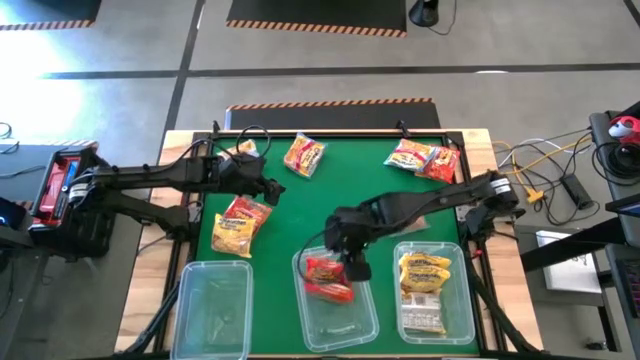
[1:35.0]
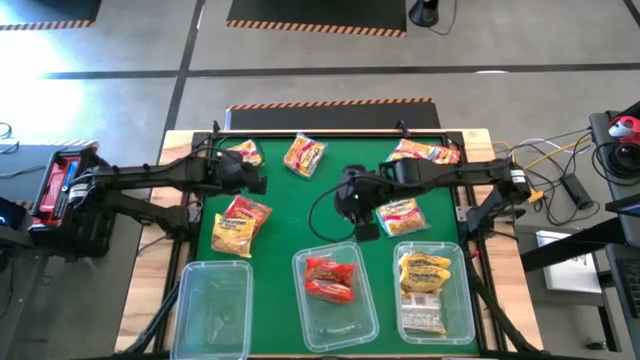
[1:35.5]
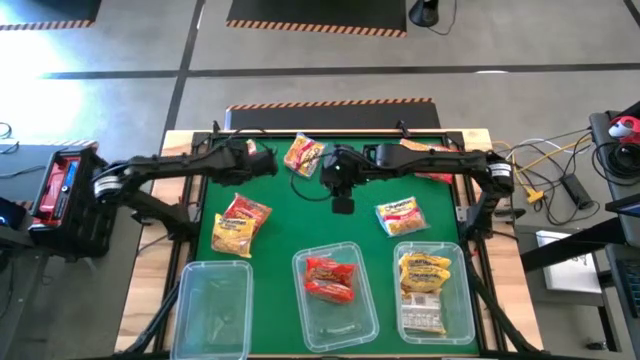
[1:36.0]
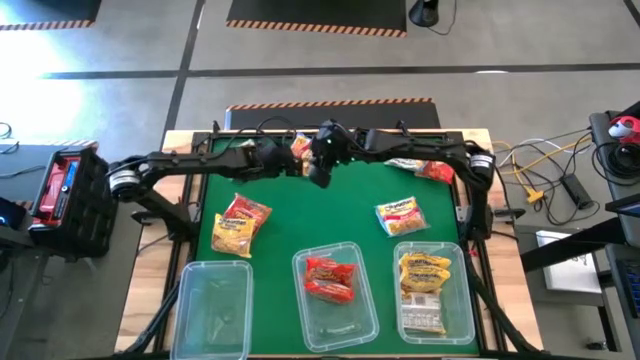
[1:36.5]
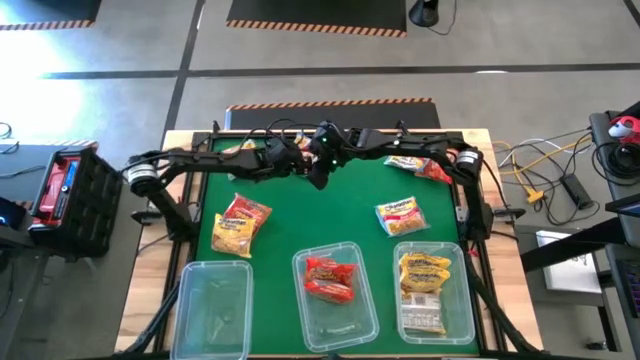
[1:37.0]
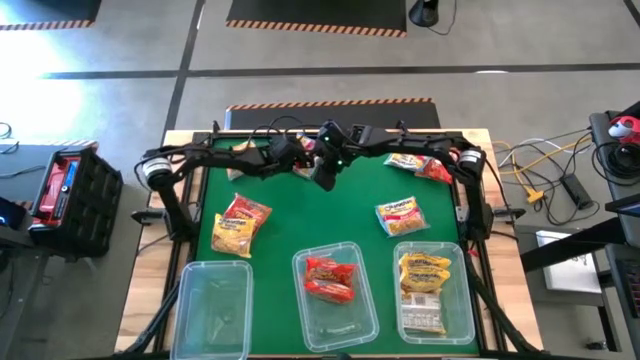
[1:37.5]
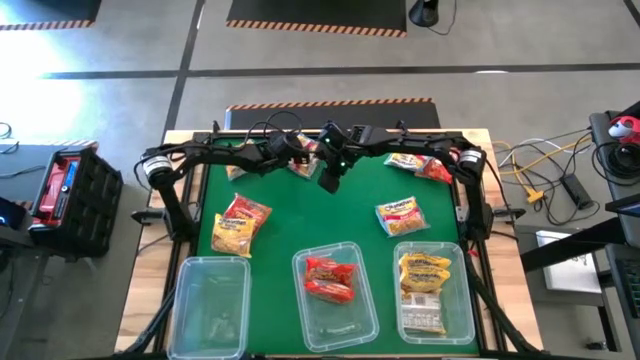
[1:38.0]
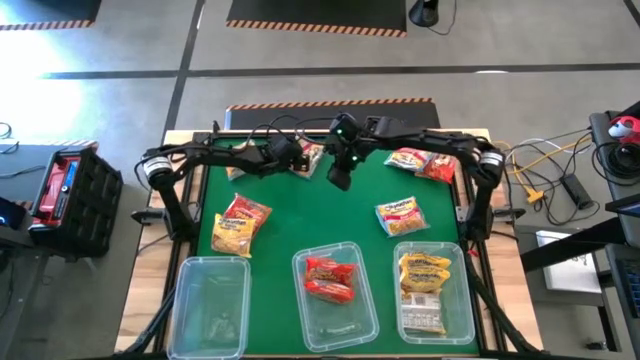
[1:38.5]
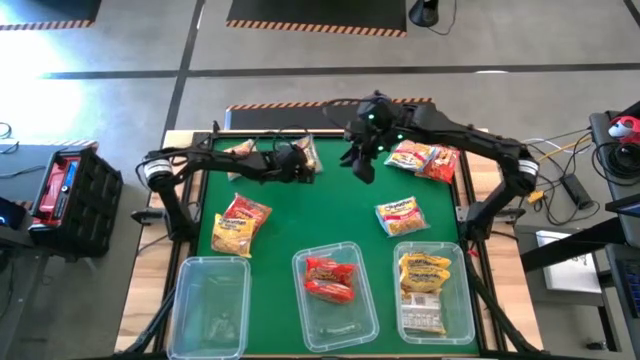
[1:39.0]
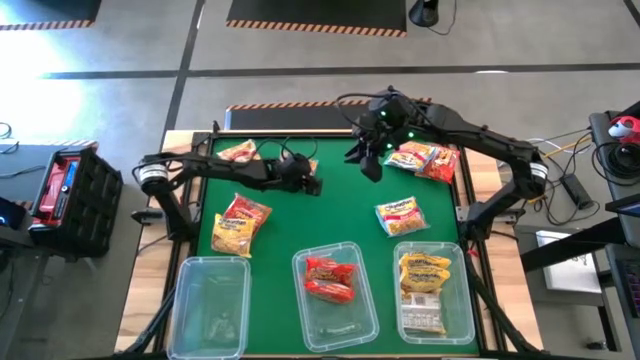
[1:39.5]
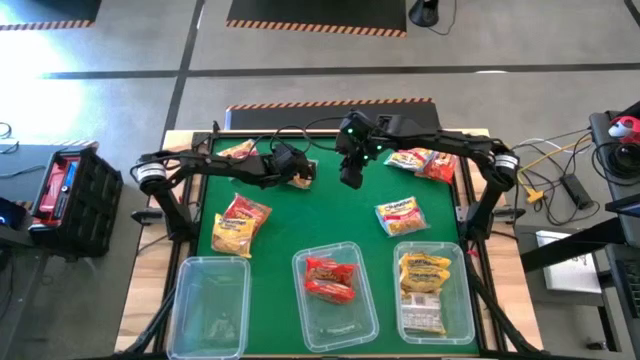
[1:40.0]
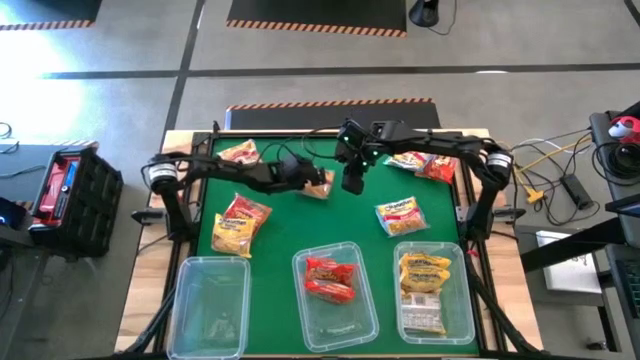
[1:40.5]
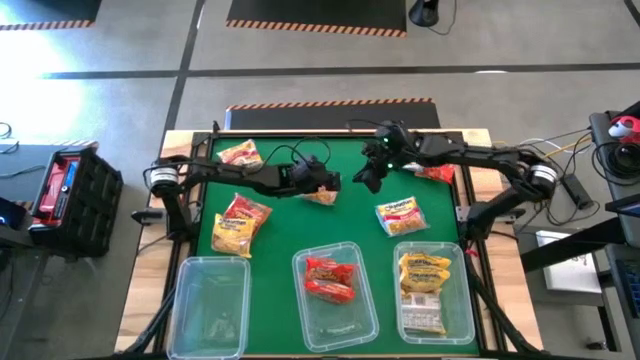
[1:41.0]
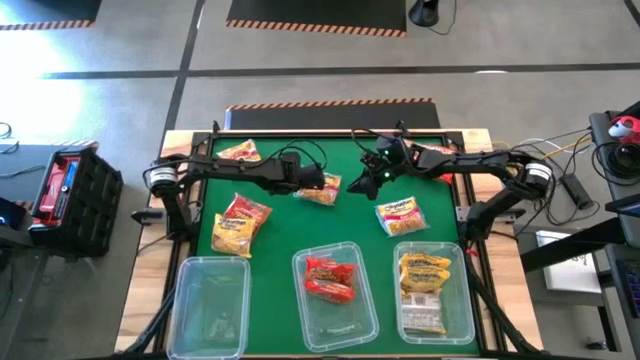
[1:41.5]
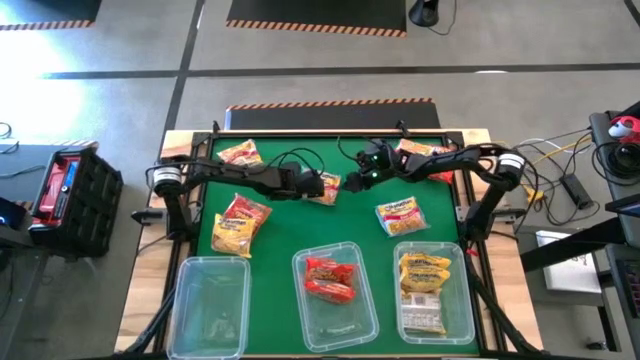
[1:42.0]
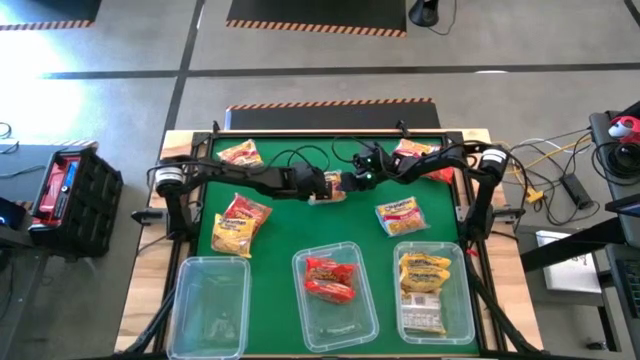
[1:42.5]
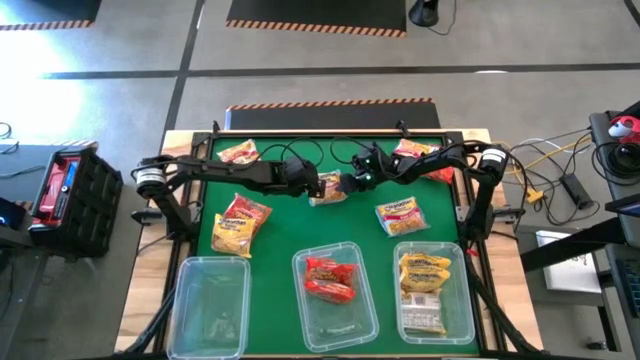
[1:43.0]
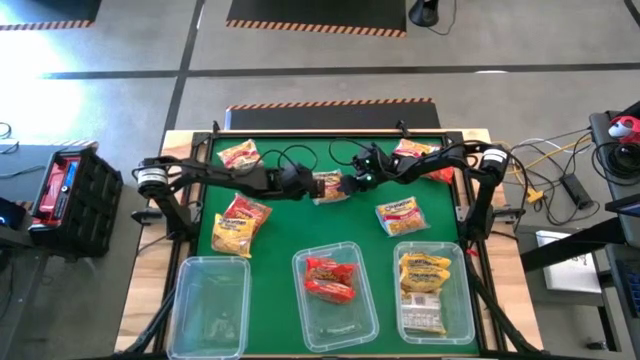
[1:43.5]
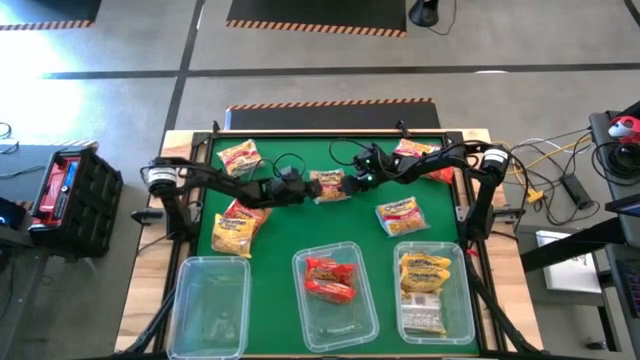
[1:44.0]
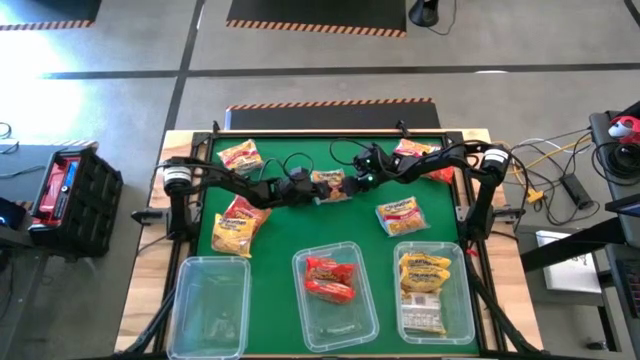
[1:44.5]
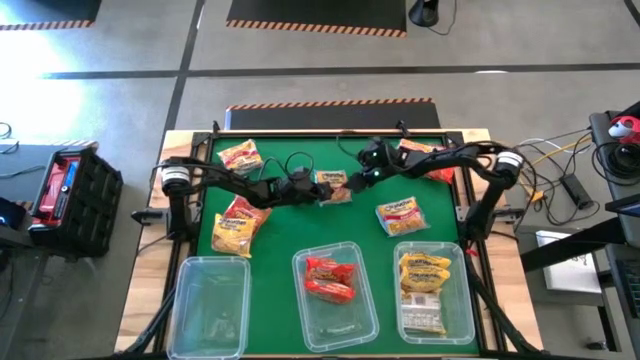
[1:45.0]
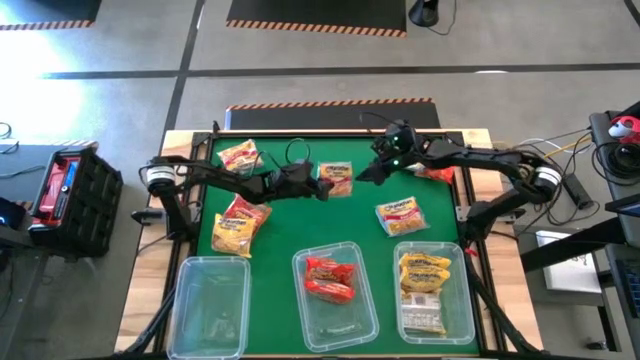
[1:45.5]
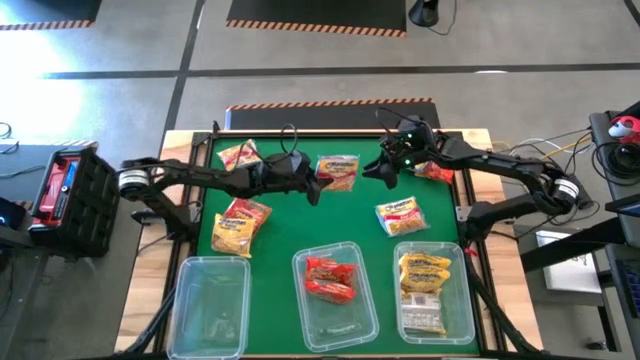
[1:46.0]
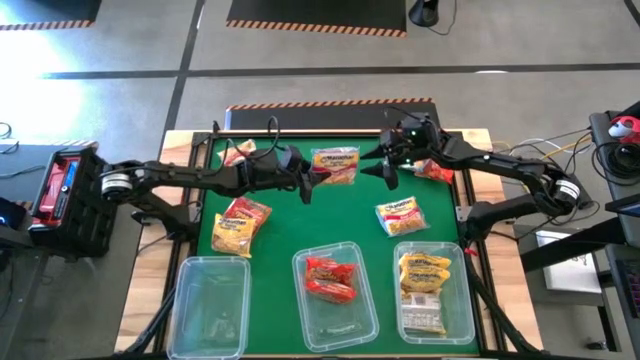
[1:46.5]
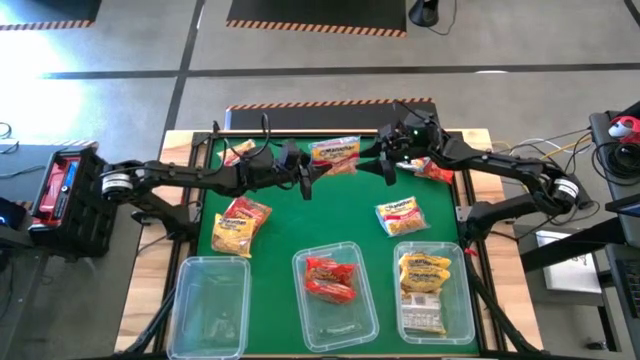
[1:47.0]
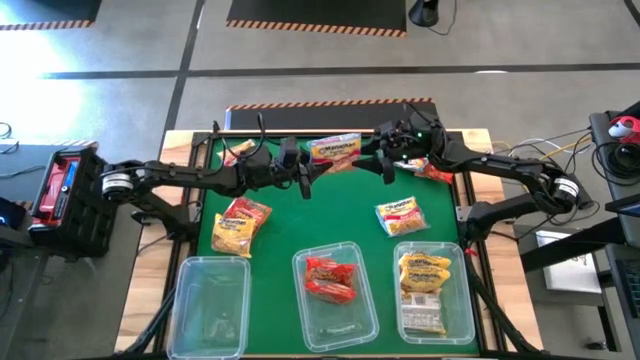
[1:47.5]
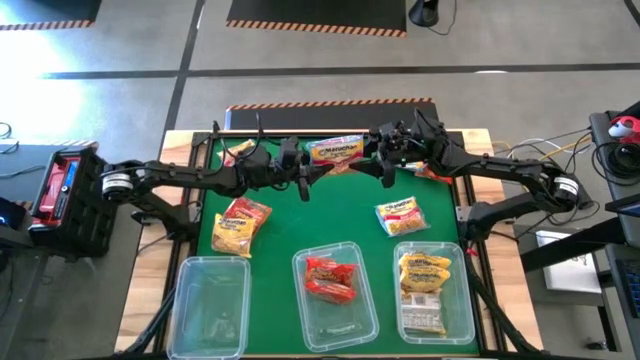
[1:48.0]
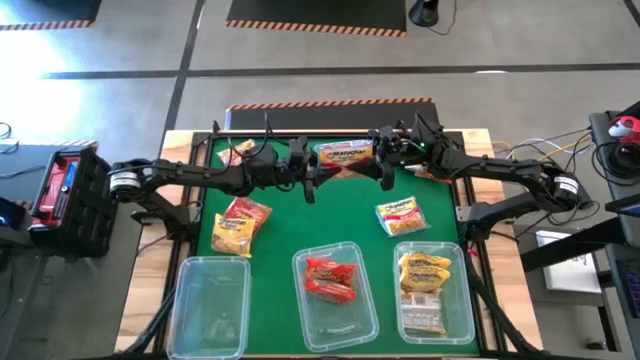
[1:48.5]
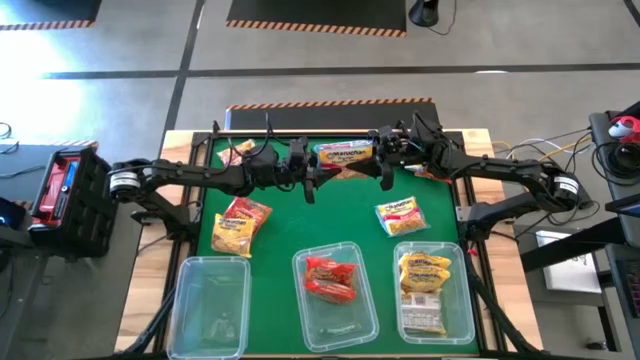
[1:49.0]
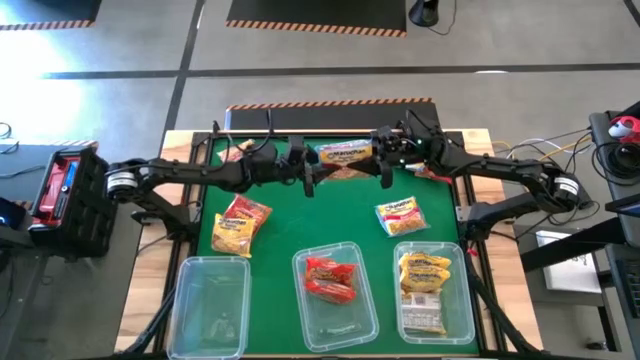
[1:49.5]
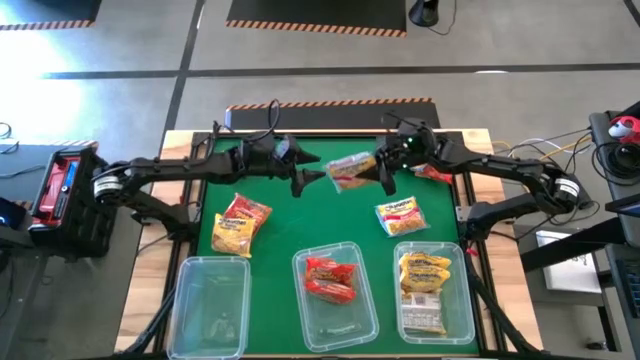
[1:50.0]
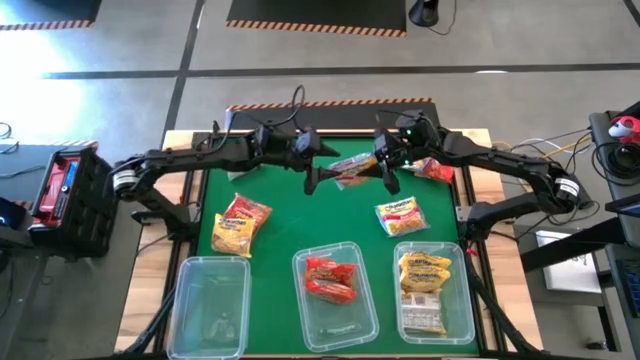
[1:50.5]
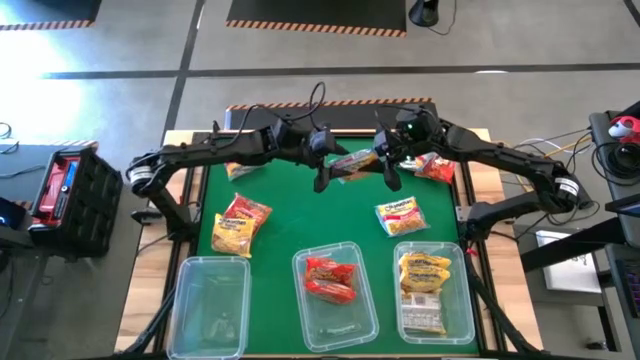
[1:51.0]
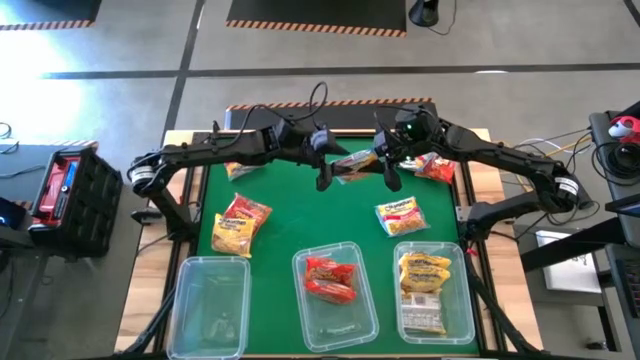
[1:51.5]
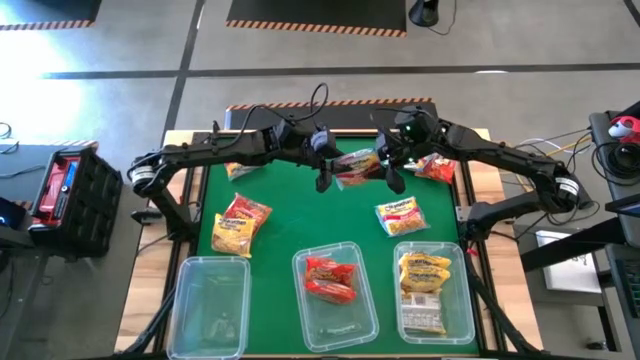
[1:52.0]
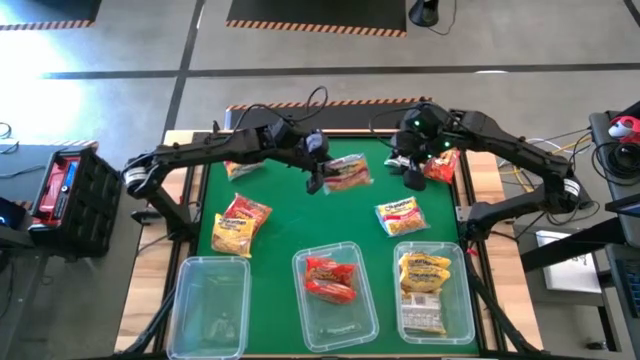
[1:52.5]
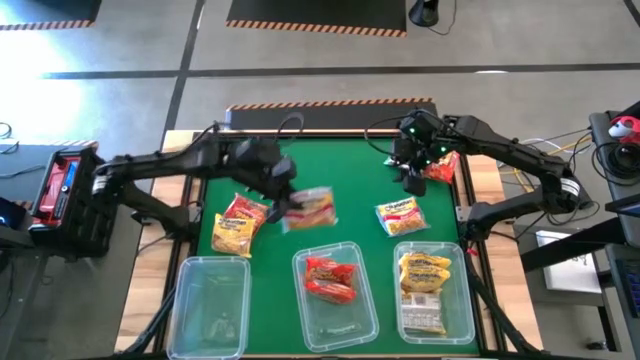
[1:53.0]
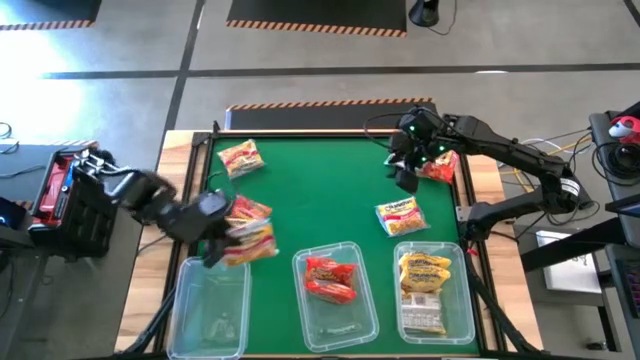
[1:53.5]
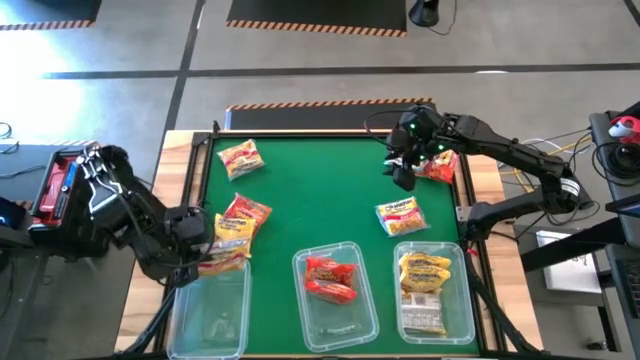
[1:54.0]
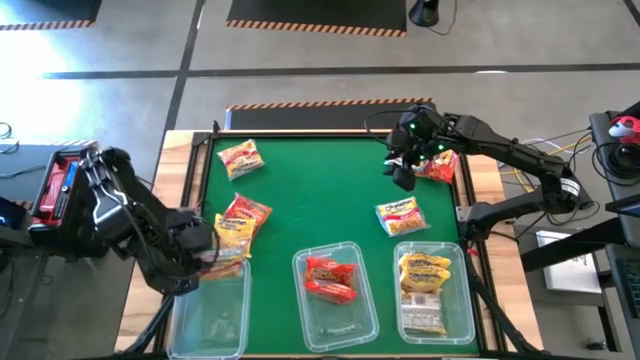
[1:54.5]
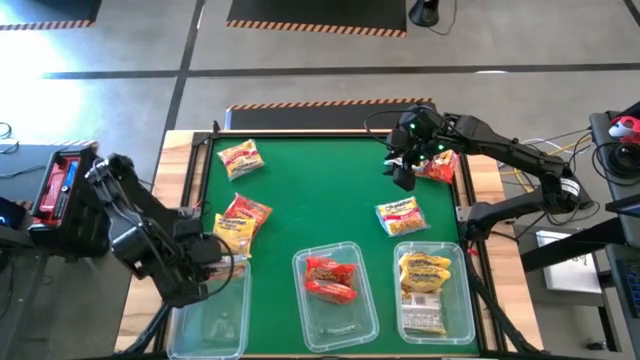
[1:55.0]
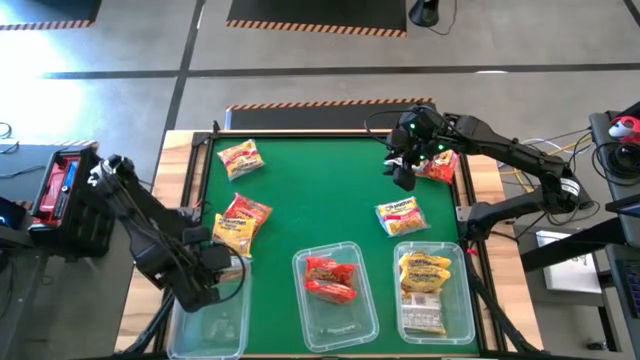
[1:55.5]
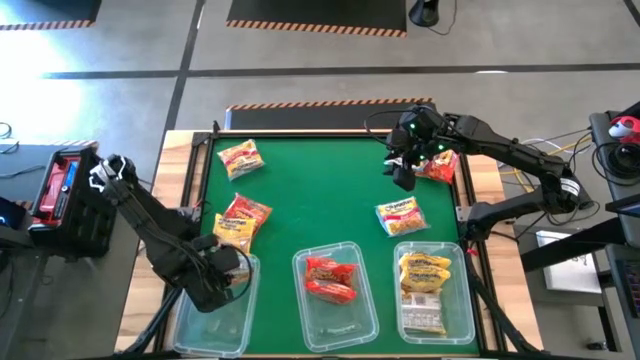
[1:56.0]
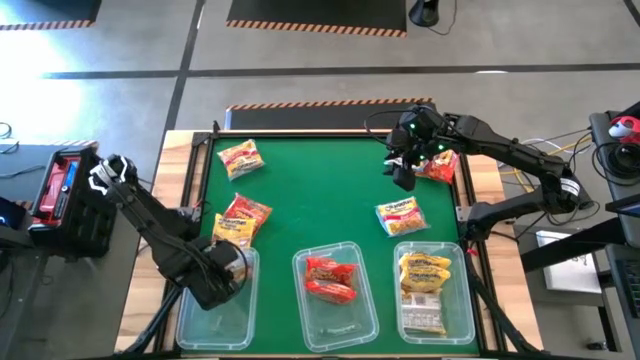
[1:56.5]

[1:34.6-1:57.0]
Task: Sort Maruchan noodles
Put the blue noodle pack into the left transparent bin
